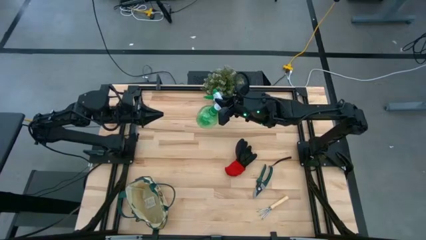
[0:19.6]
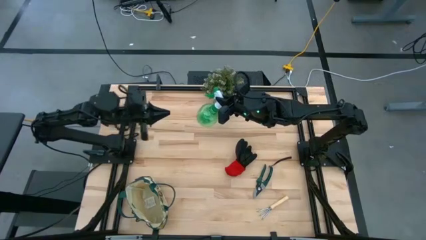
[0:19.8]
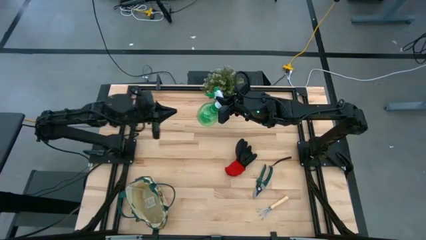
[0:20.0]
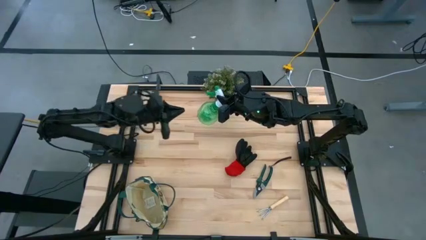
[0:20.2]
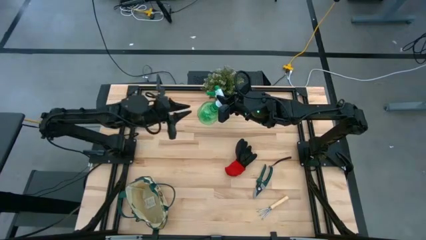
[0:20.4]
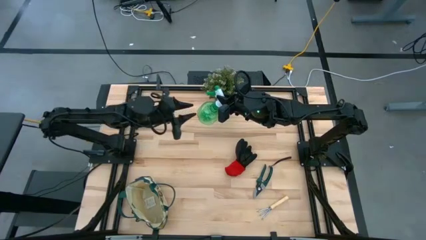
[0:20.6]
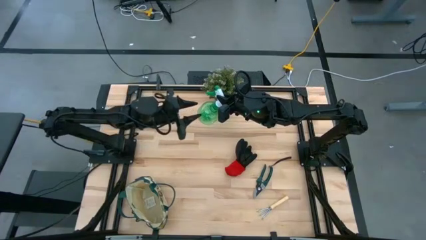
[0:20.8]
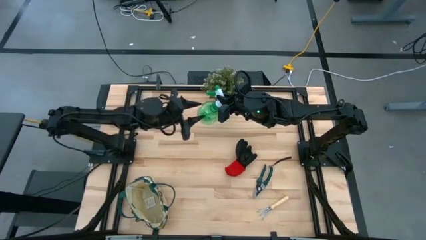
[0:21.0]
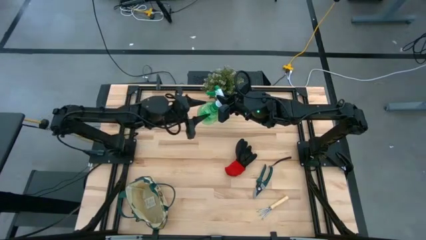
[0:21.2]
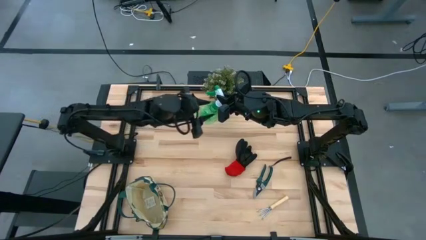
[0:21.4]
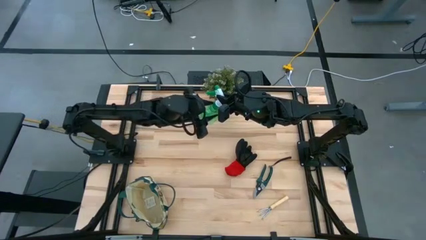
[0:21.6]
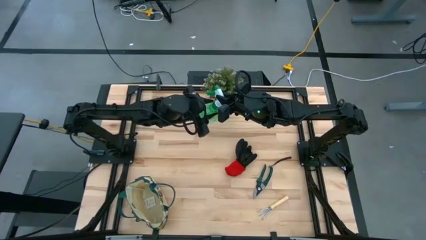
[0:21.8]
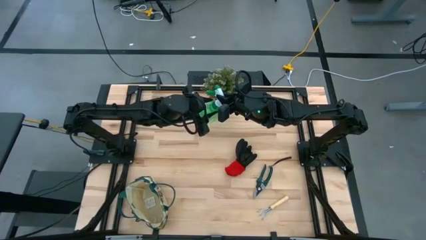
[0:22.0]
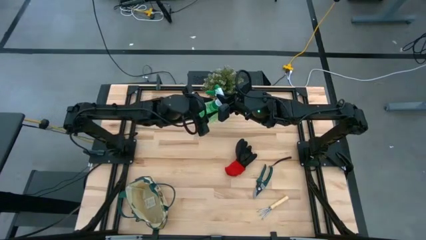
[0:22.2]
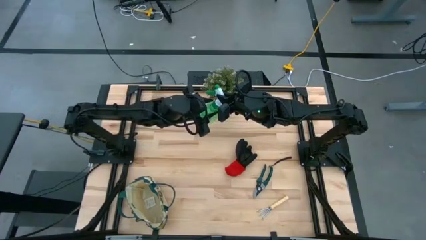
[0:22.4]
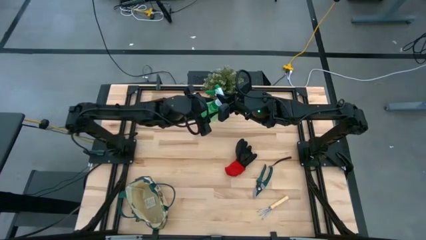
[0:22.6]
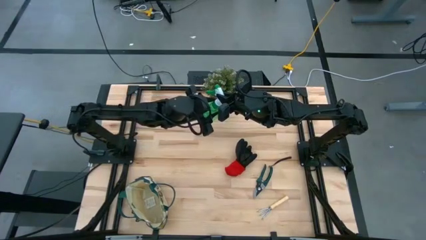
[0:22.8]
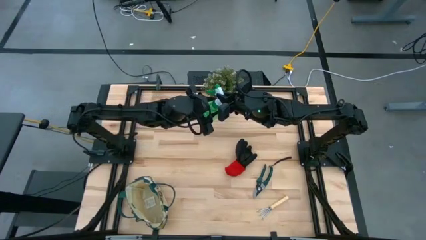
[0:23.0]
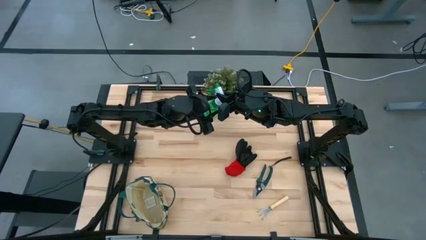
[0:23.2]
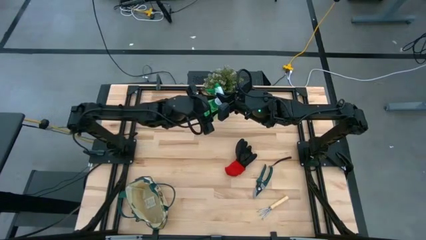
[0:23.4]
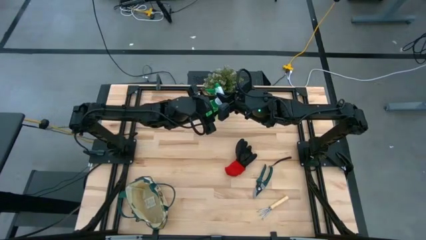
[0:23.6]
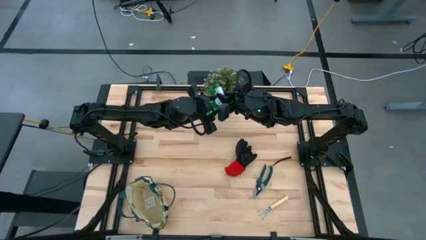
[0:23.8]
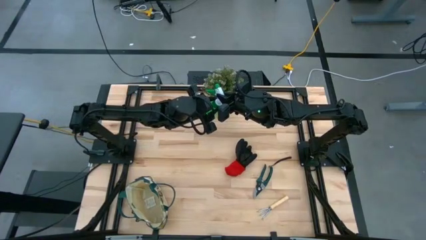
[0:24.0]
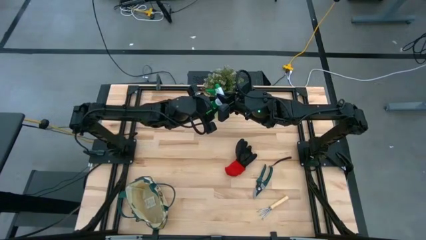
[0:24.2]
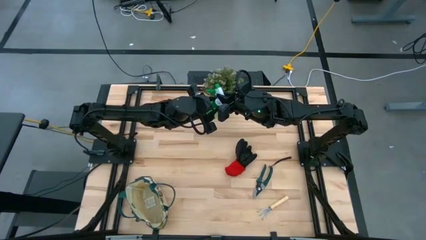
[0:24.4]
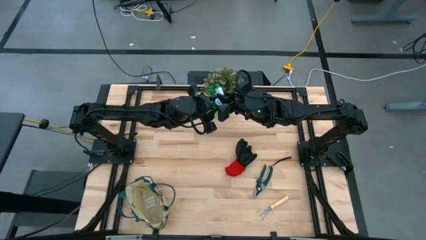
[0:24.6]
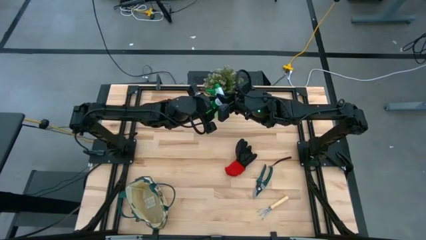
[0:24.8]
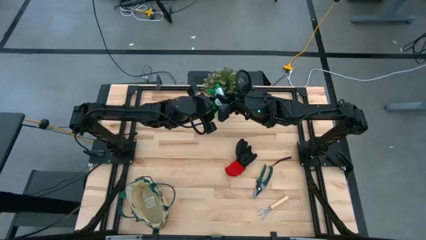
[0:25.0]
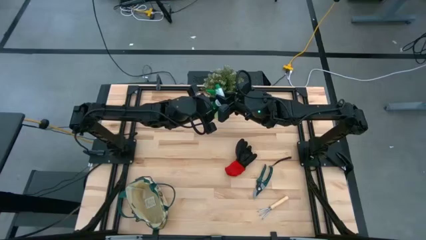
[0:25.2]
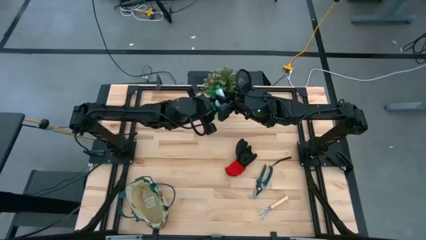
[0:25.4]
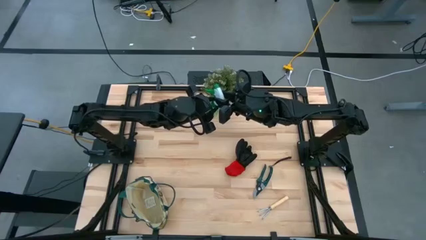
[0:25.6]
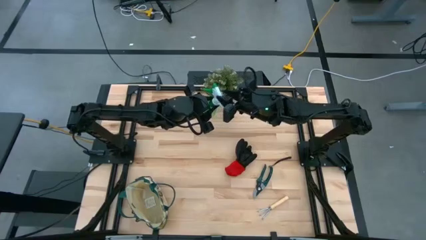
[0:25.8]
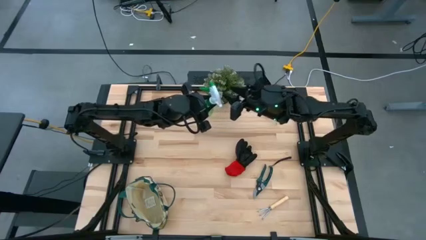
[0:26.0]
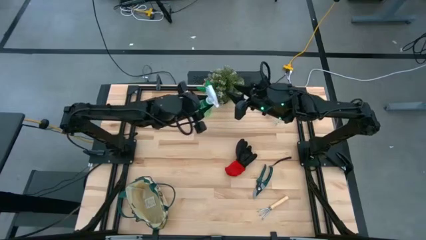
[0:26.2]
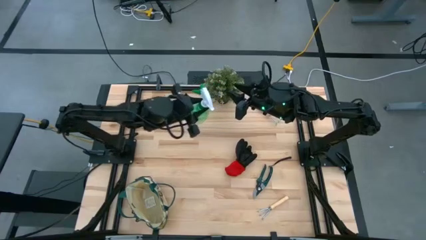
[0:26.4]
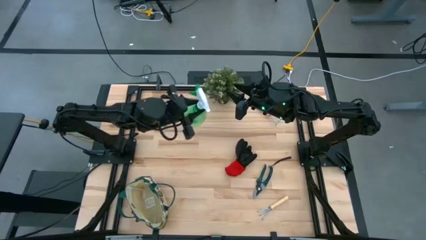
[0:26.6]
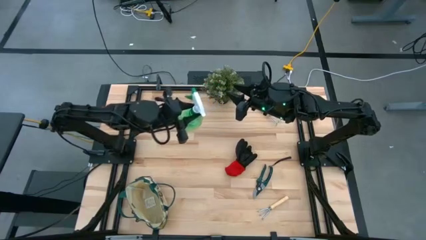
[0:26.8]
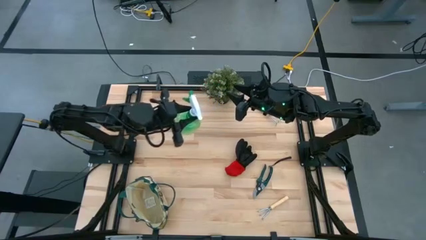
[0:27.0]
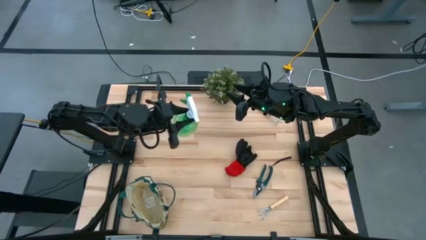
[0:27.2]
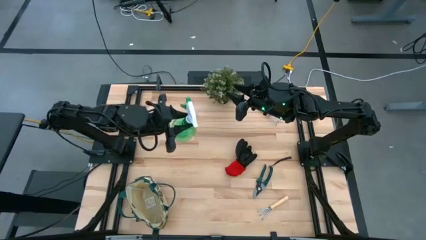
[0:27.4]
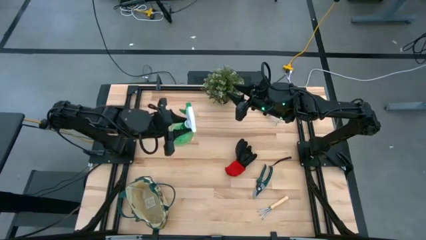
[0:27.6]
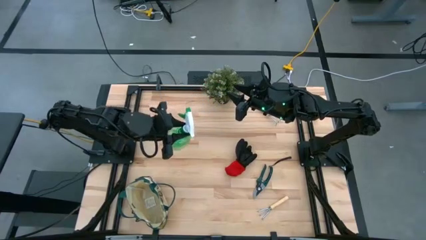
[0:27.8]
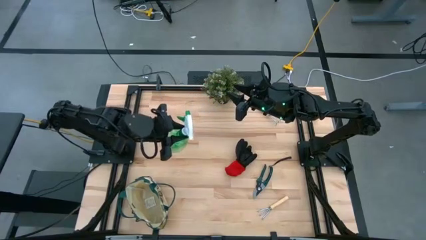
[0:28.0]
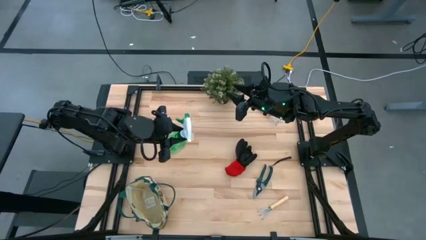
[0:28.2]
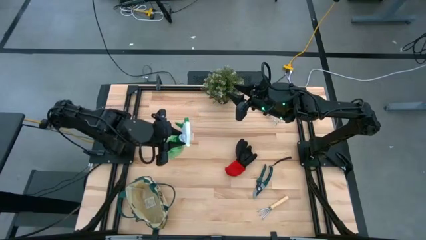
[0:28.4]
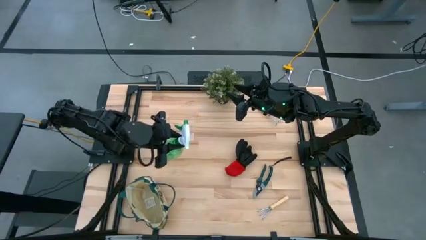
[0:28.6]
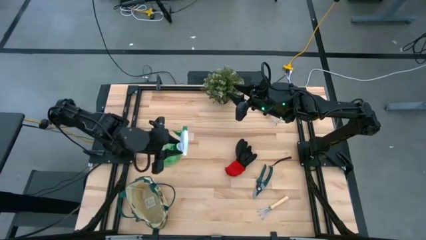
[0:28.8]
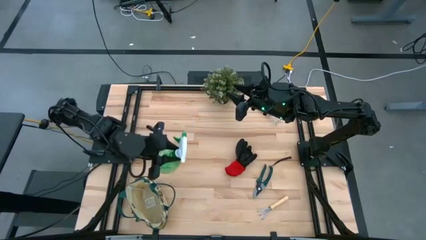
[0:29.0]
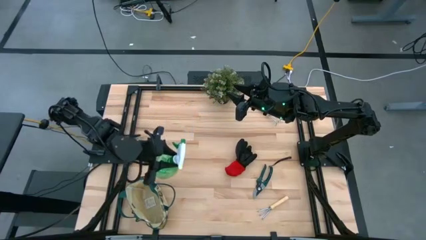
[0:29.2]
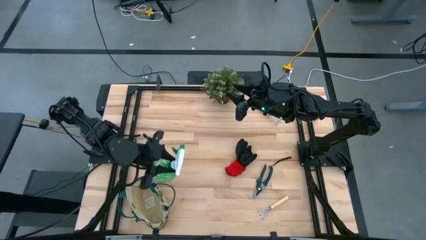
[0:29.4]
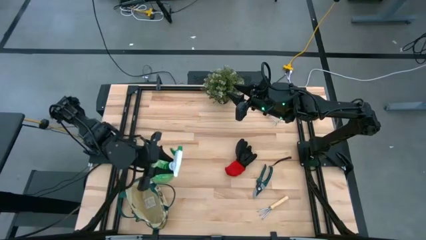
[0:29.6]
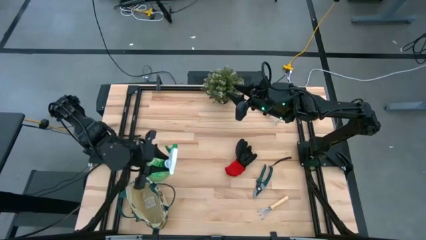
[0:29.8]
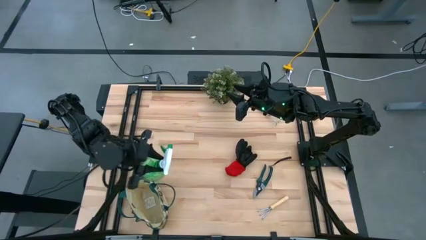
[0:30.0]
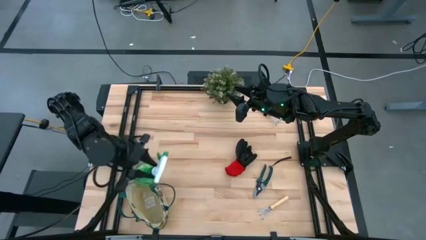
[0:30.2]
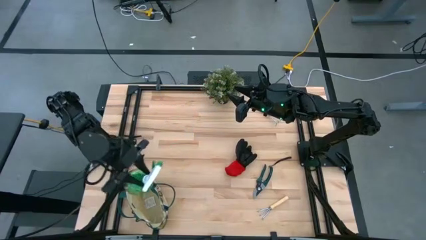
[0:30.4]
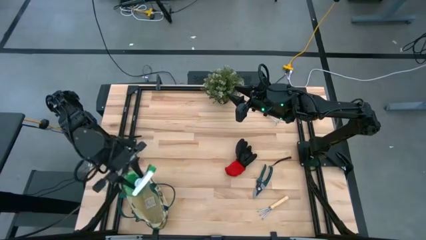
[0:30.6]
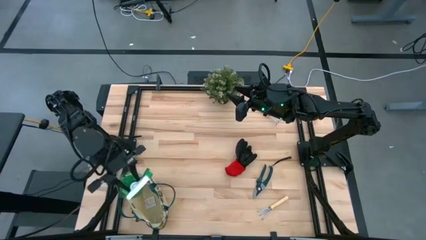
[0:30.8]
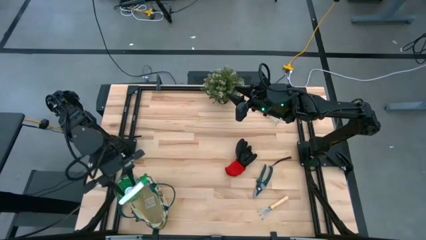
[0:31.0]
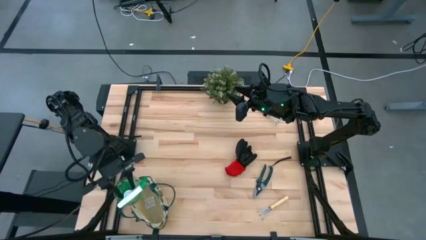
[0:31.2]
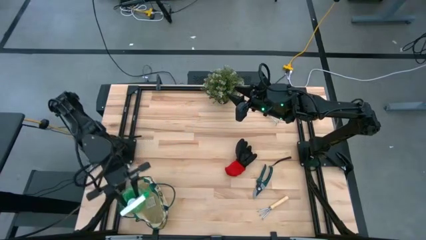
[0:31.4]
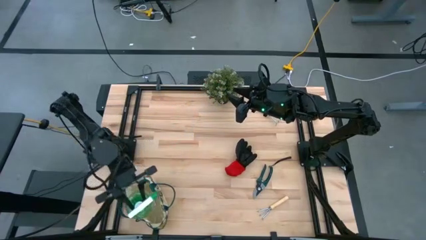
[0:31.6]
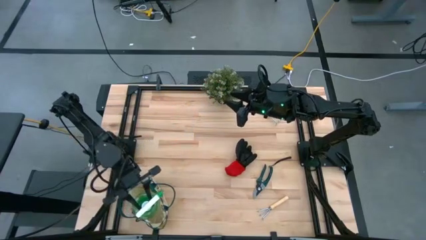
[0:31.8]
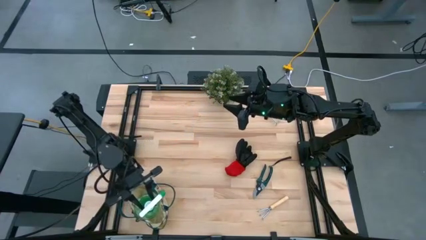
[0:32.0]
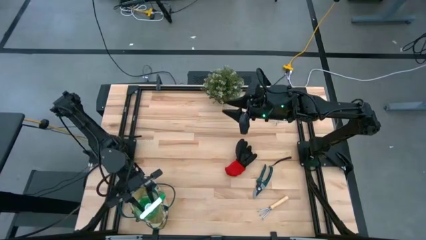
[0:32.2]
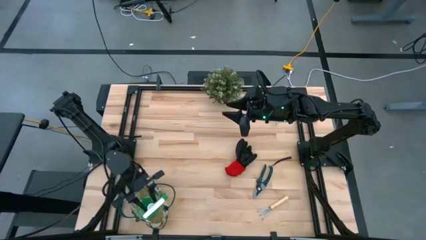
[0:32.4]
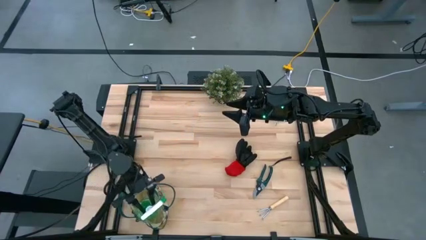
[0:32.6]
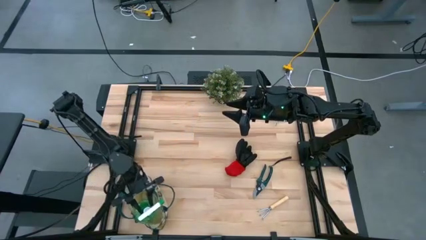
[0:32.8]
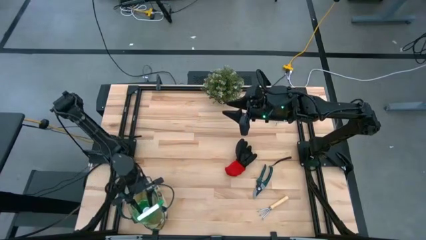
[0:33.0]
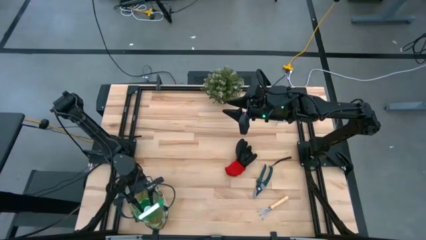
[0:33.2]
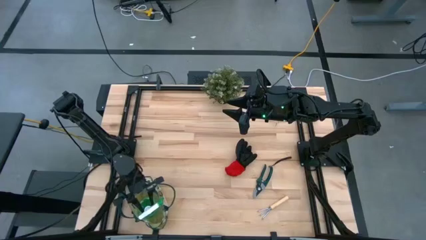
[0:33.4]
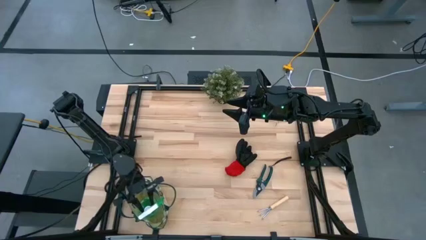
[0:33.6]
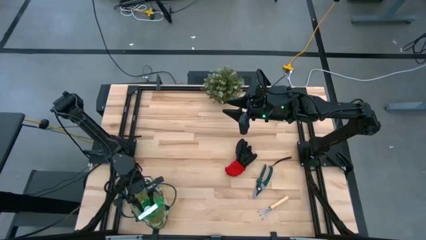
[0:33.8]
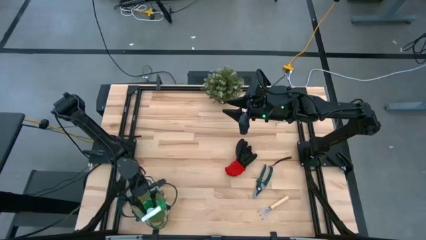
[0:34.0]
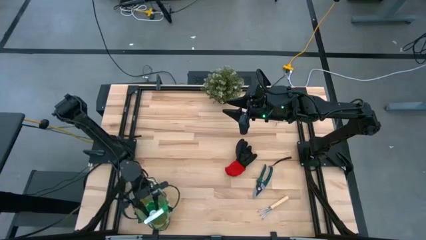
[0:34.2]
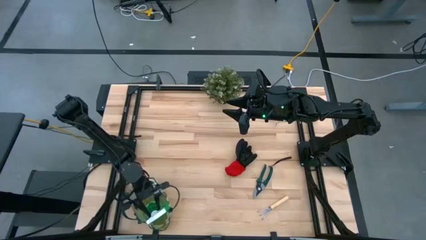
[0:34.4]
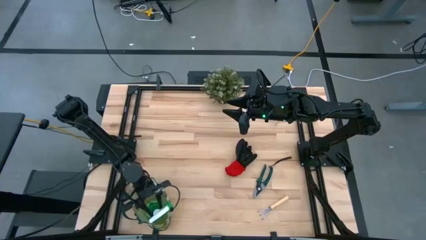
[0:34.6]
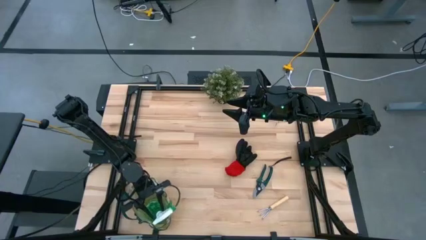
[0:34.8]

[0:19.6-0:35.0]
Task: Pick & Place Garden tools in Gardening bag
Put the green spray bottle into the gardening bag
